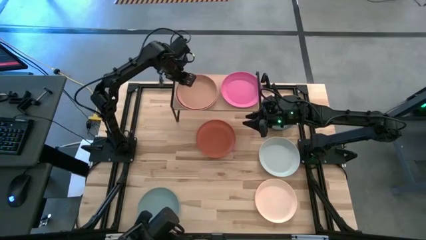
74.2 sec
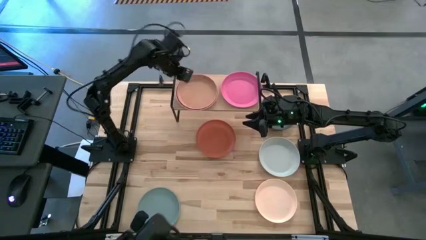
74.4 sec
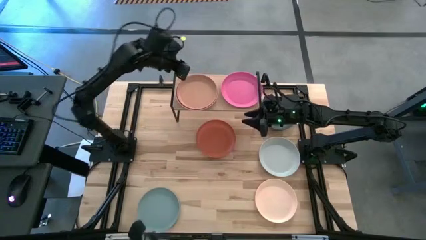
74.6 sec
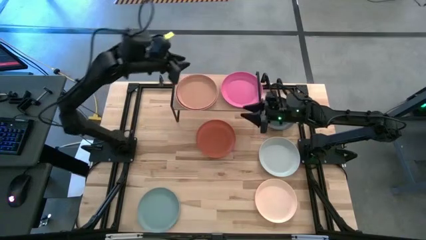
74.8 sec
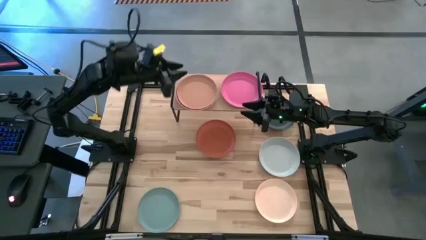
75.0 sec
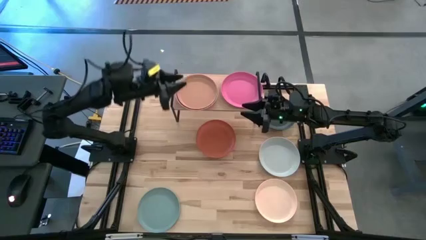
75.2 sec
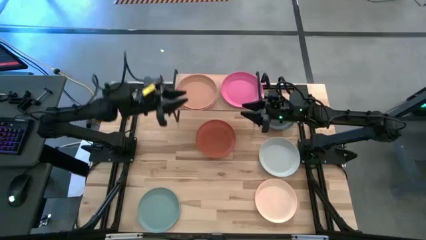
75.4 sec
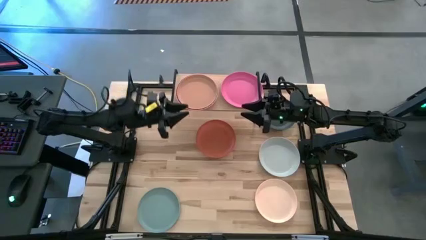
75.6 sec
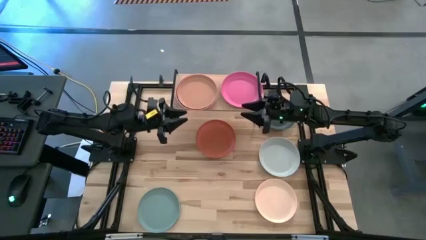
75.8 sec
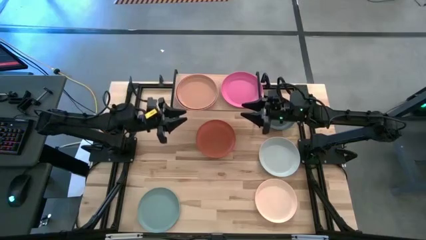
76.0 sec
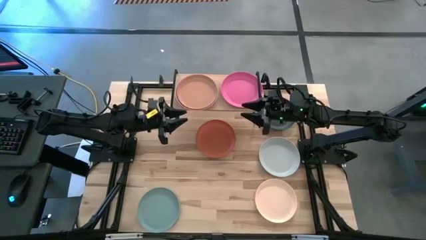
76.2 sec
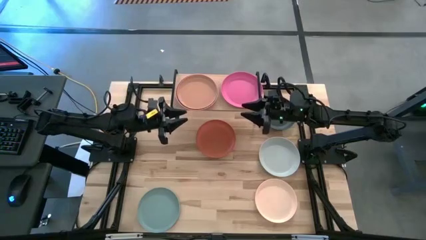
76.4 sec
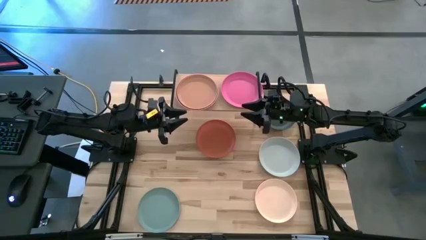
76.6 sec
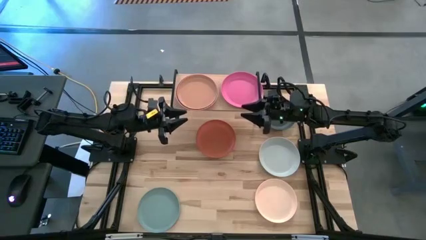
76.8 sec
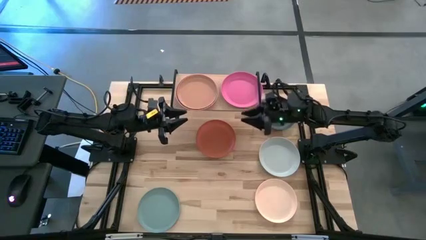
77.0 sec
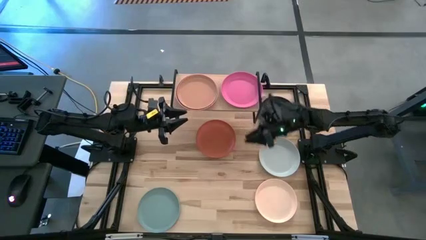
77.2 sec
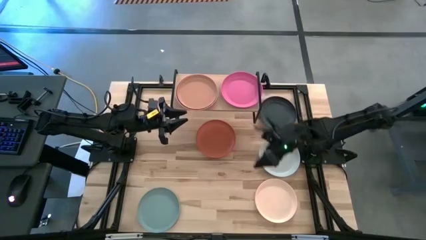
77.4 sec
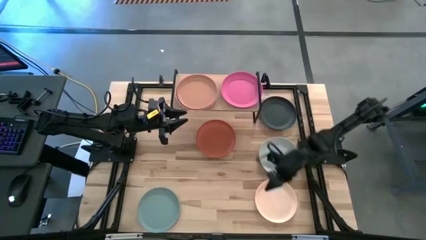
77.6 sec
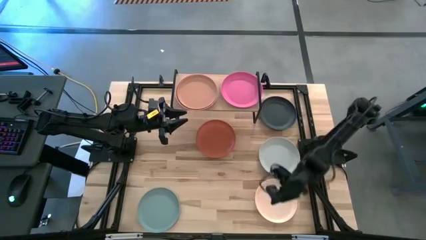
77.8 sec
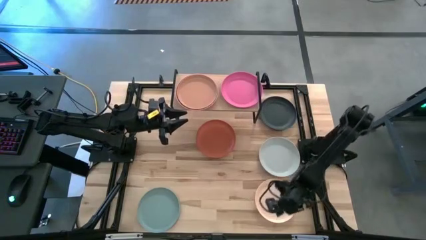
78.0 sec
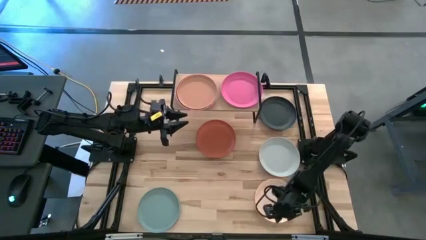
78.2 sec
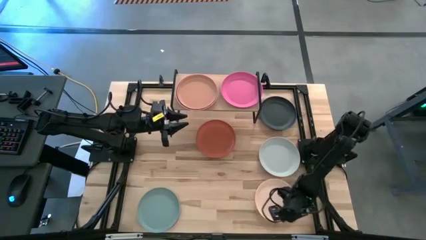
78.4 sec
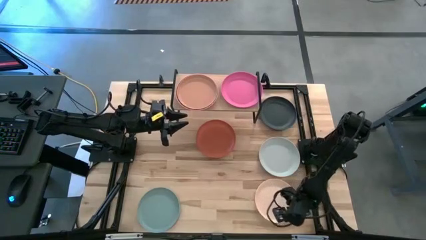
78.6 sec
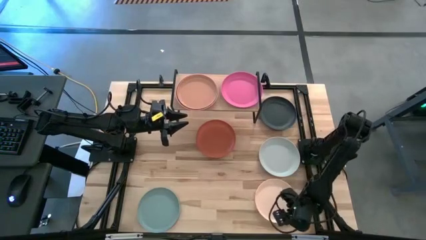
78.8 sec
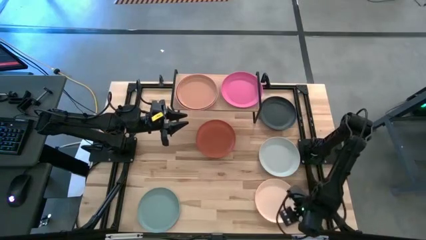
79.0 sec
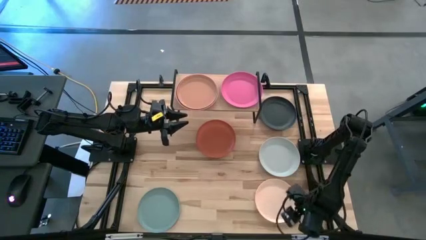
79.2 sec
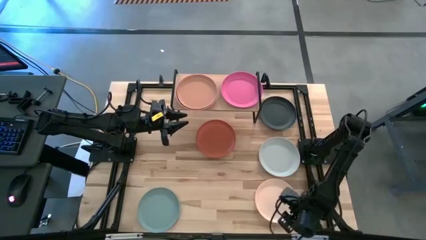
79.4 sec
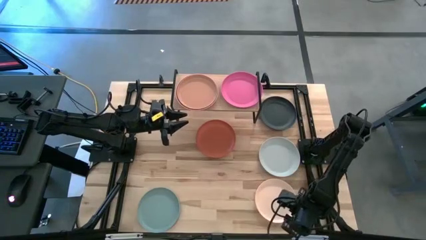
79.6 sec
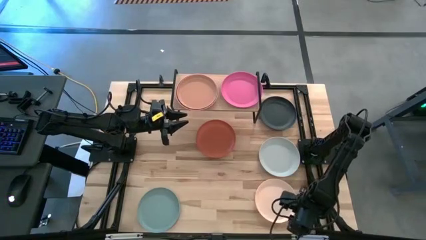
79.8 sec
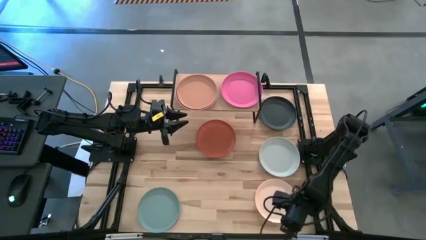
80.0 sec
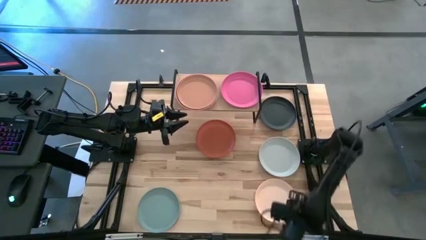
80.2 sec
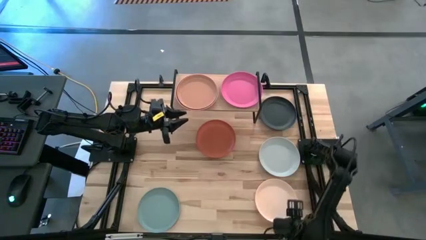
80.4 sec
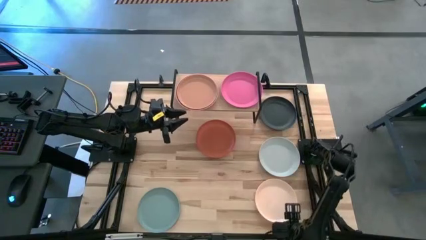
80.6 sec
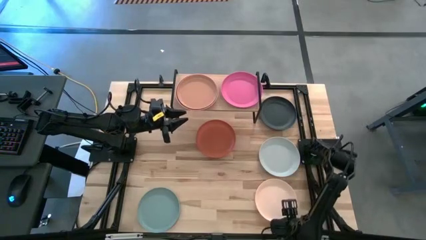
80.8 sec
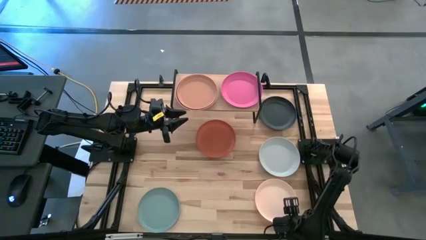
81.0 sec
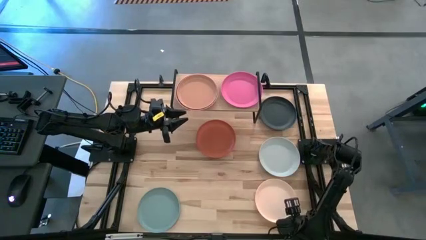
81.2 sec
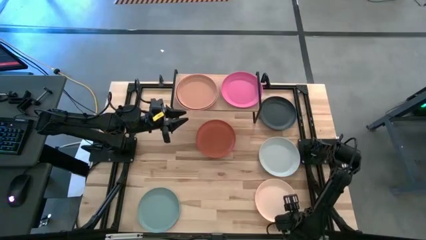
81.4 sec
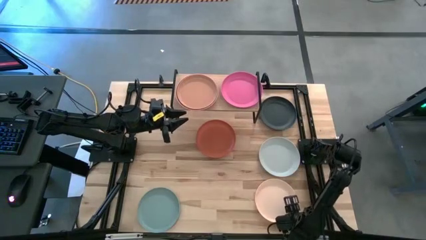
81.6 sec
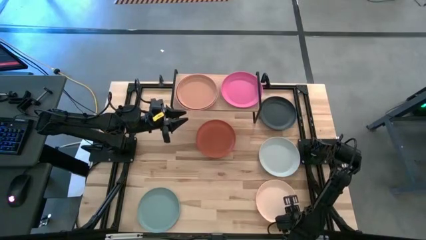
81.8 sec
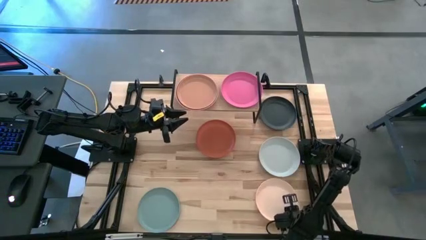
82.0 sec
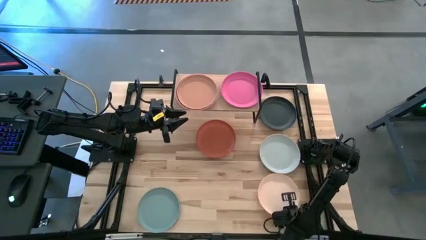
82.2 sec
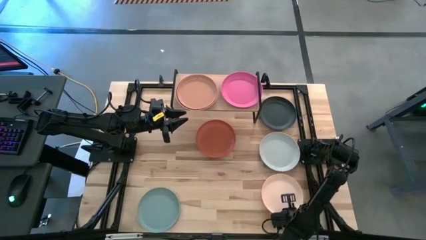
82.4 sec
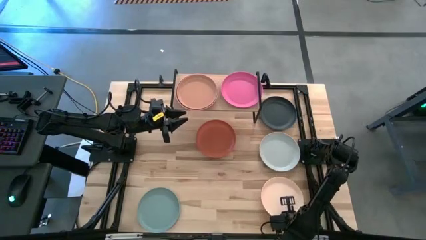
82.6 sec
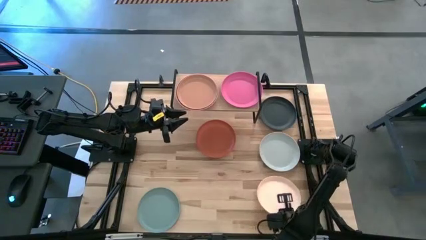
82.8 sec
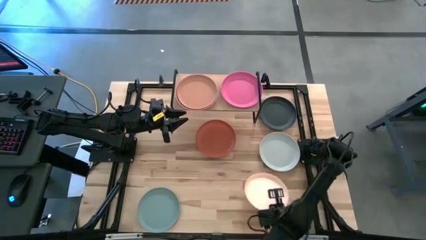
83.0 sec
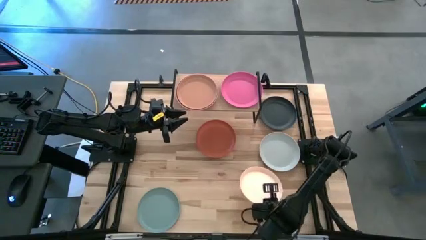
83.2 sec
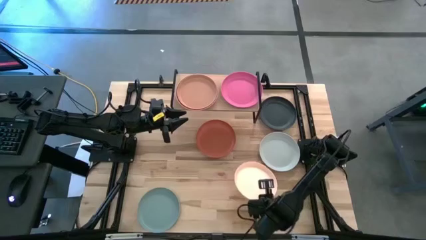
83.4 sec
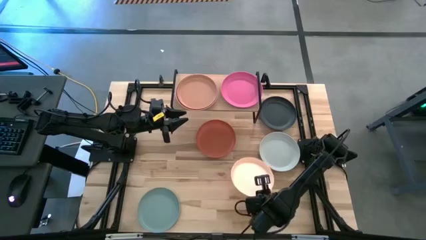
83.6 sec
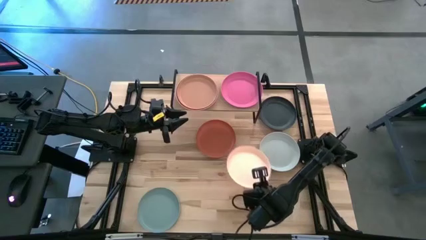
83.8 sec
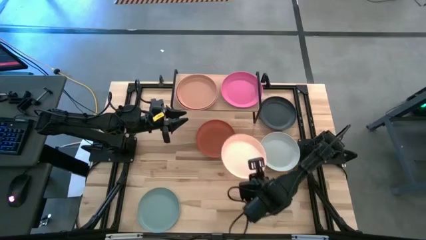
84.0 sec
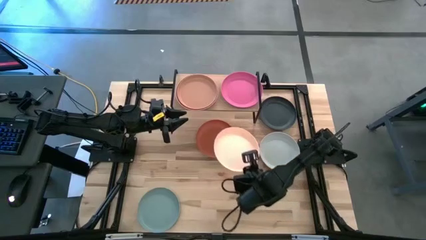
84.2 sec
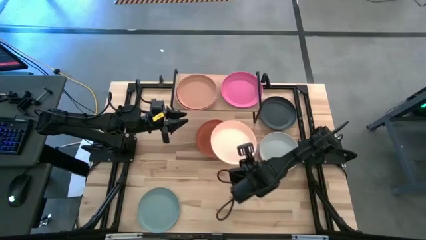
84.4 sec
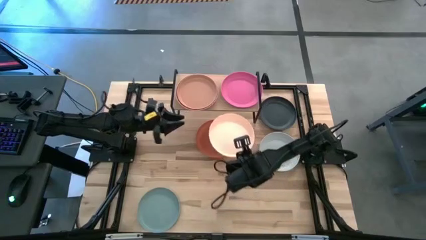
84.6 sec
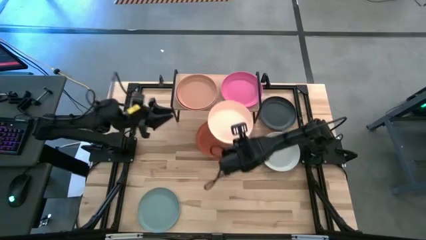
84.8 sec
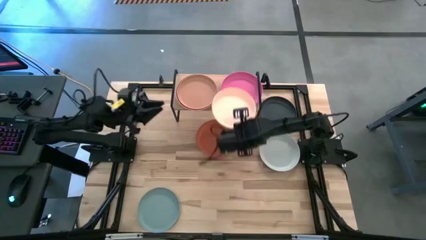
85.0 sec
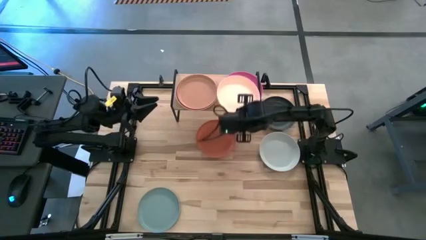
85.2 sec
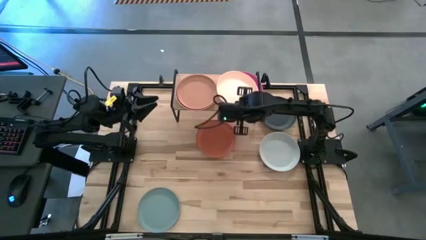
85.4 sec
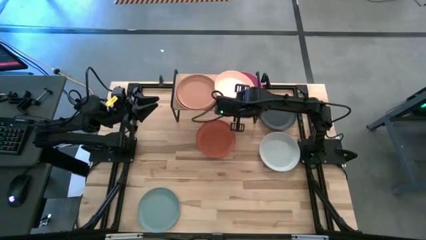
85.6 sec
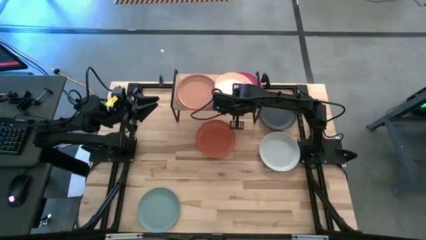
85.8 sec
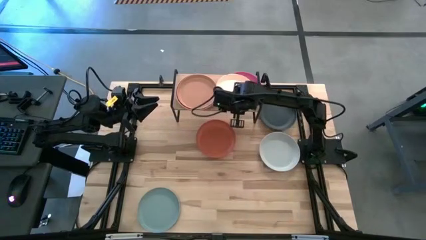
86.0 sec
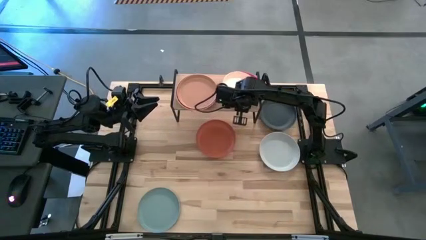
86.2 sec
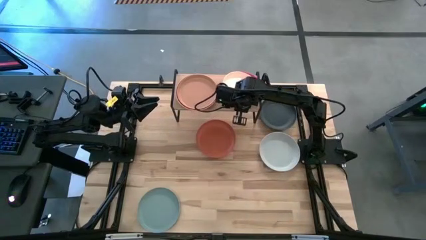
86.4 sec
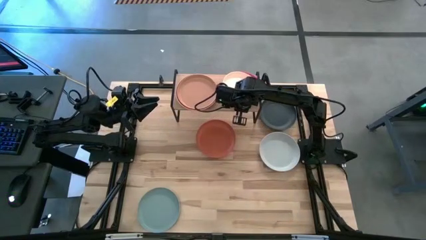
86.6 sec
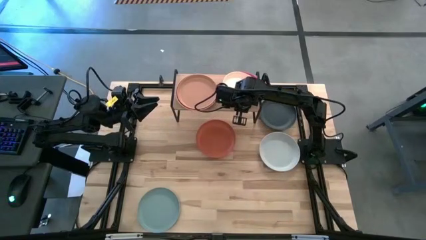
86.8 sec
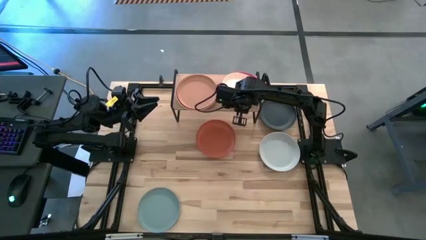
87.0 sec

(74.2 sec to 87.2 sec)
Task: Place and stack plates onto a shelf
Stack the light orange plate on top of the pink plate

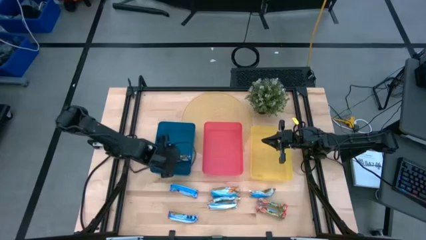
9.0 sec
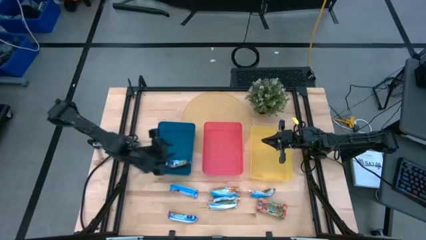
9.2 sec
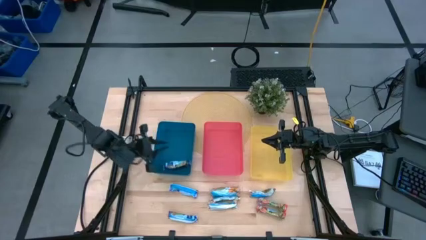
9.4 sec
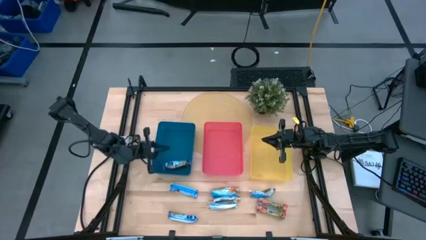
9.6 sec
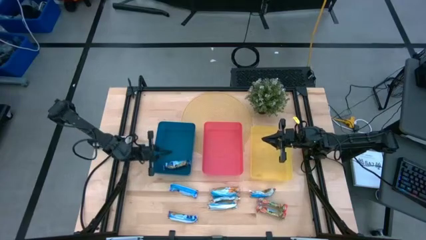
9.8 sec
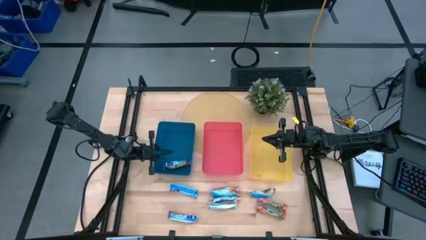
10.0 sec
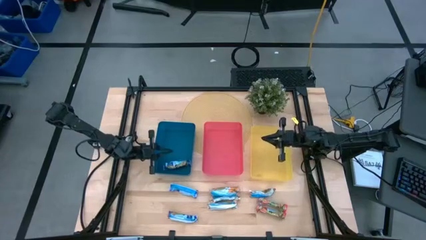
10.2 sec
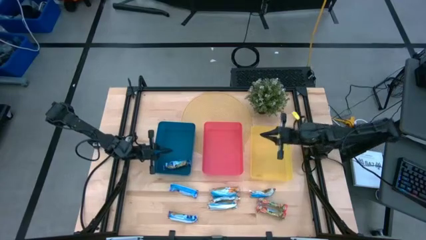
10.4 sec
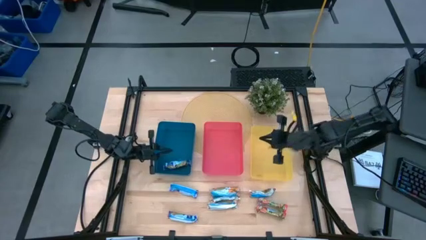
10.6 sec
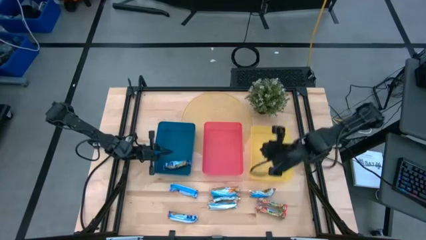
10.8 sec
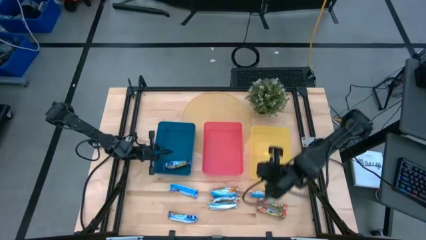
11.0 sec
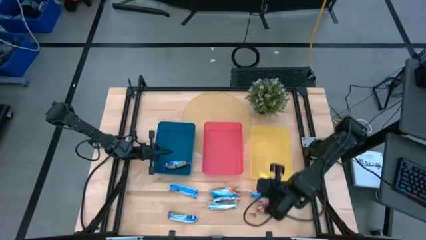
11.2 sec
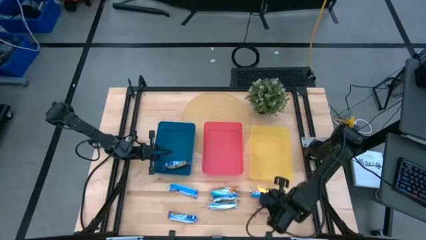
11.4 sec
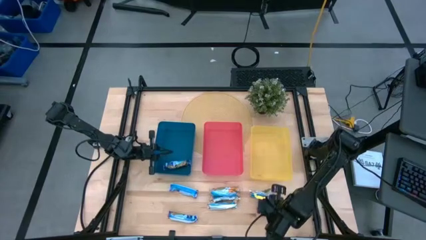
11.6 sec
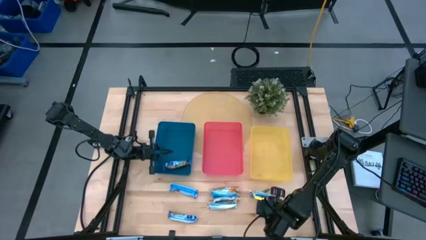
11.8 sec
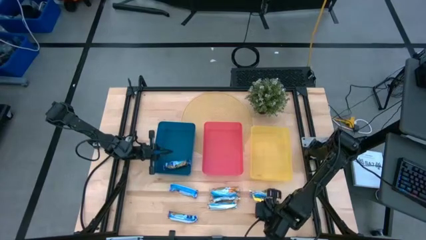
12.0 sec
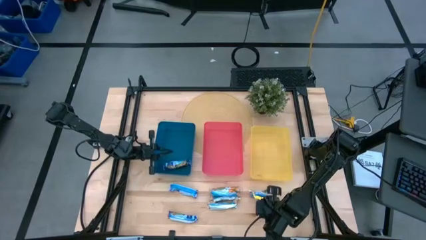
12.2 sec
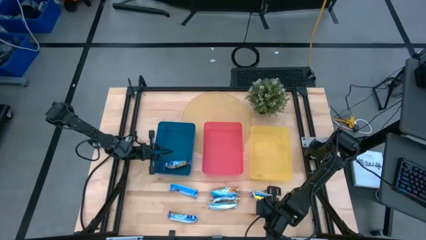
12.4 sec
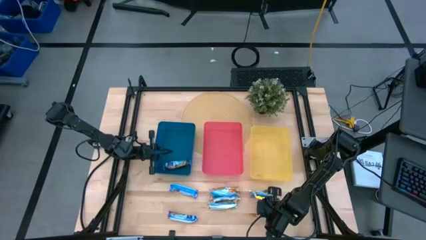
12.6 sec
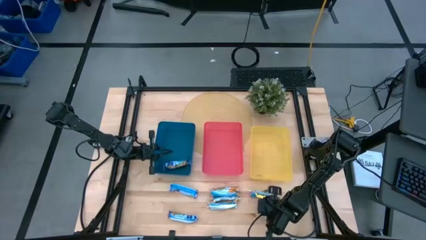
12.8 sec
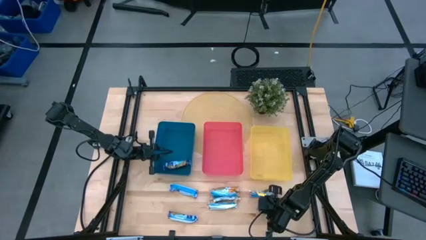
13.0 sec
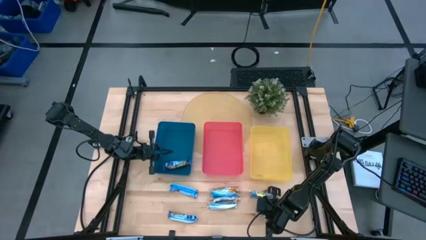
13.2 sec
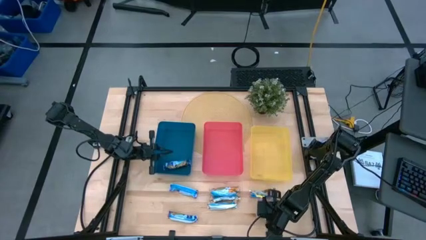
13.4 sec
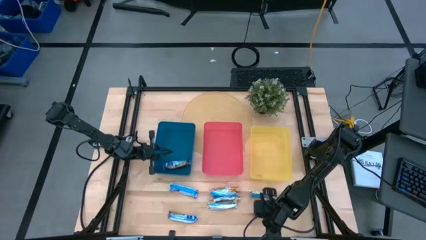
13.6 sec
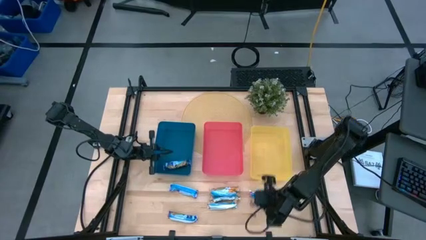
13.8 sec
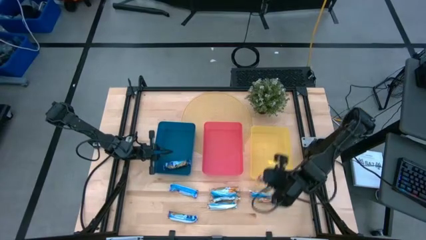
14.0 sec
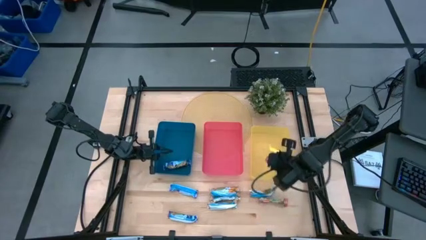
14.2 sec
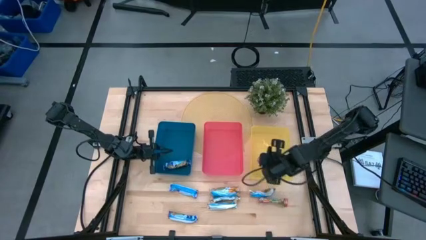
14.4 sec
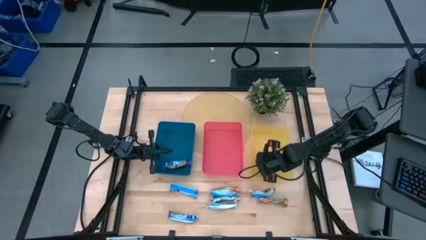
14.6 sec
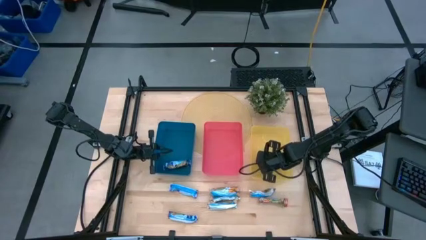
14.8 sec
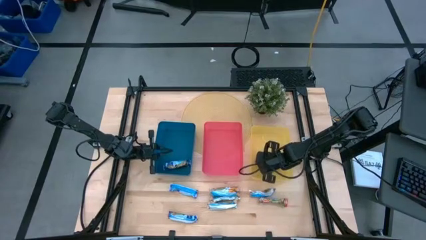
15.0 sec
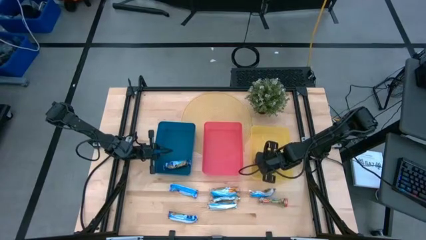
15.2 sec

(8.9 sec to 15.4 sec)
Task: Pick and place Granola Bars by type
Put the red granola bar into the yellow bin
